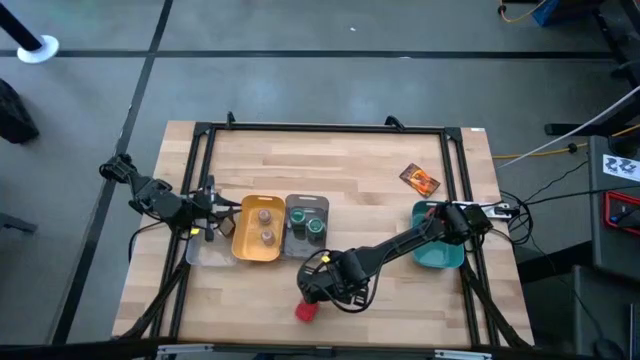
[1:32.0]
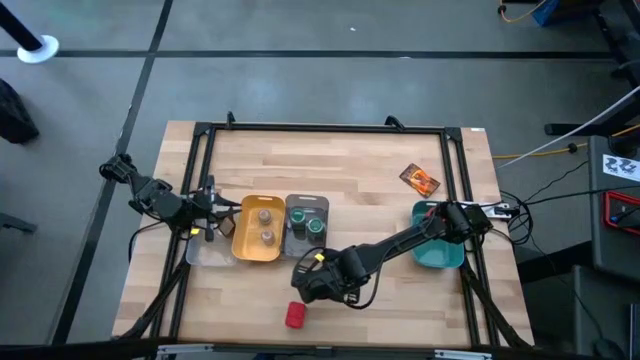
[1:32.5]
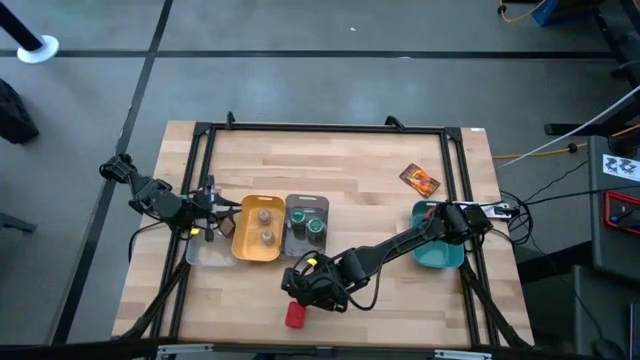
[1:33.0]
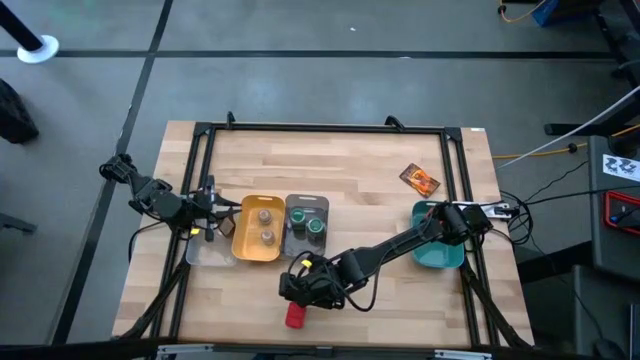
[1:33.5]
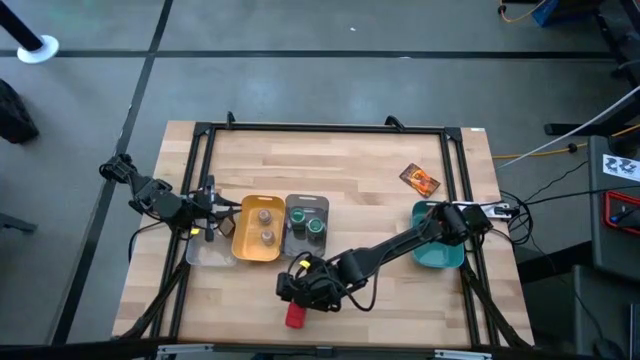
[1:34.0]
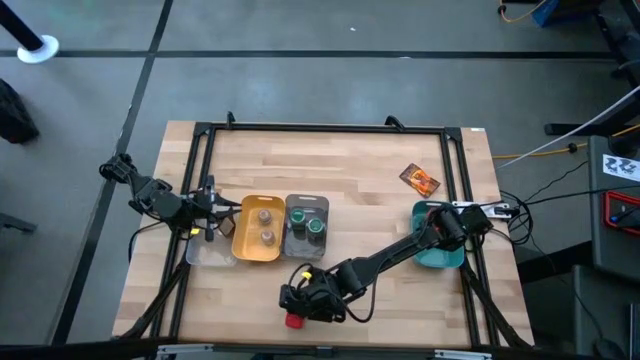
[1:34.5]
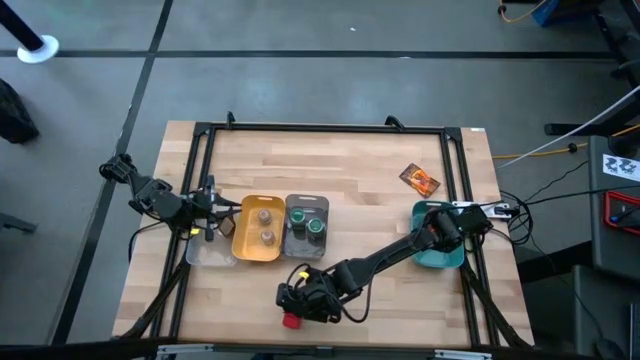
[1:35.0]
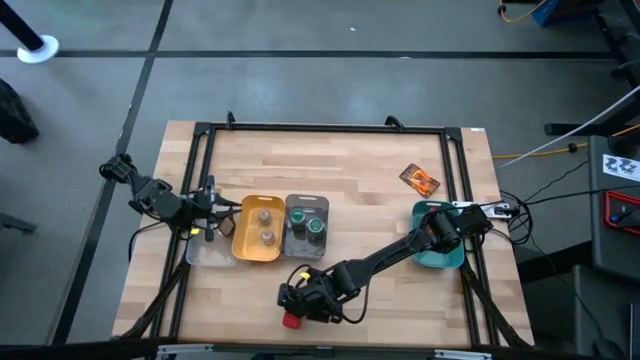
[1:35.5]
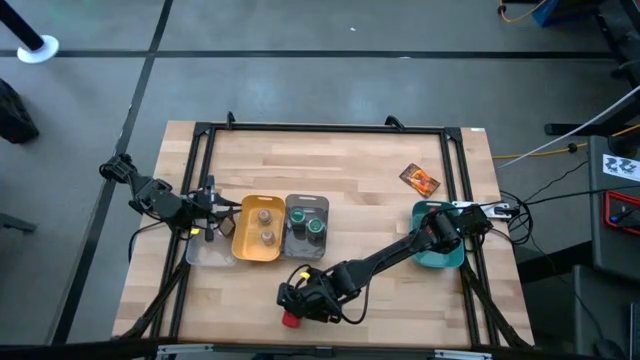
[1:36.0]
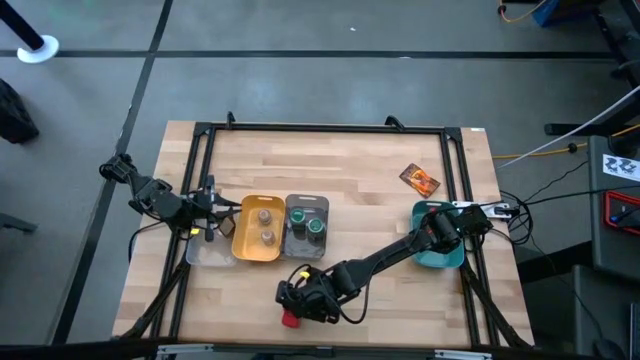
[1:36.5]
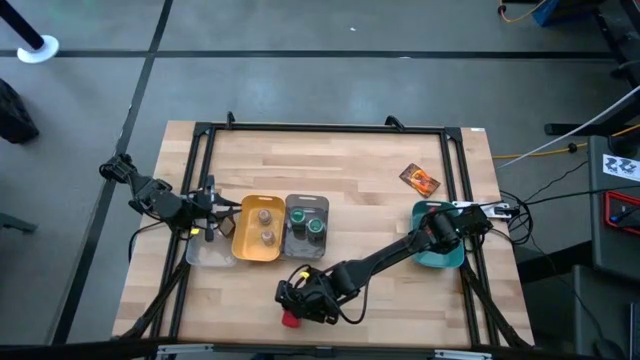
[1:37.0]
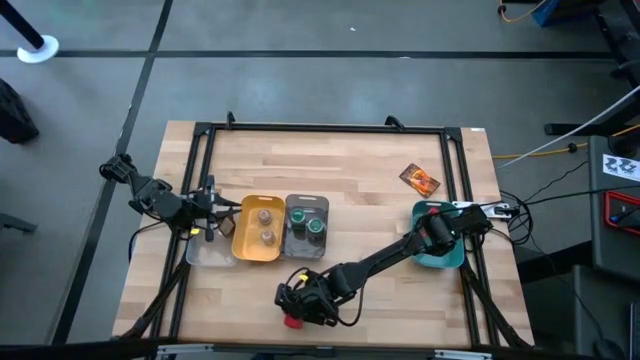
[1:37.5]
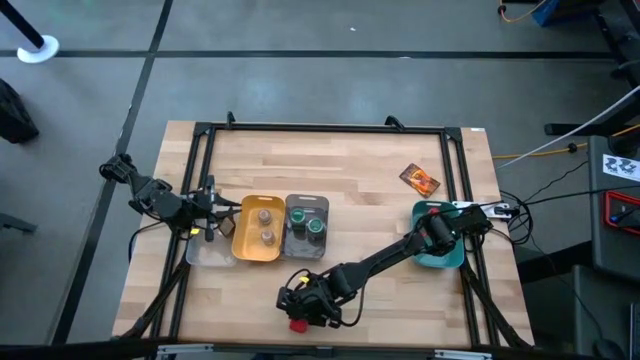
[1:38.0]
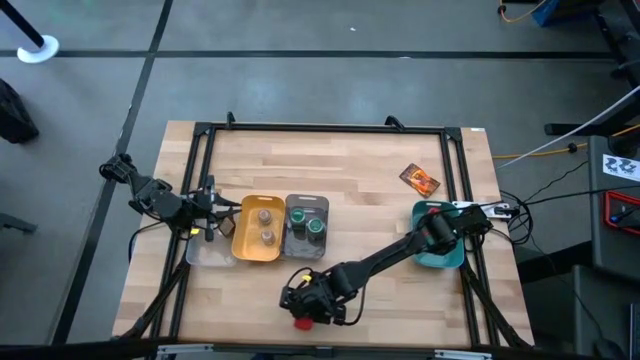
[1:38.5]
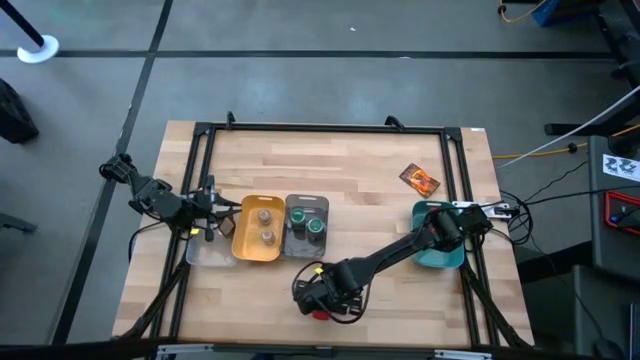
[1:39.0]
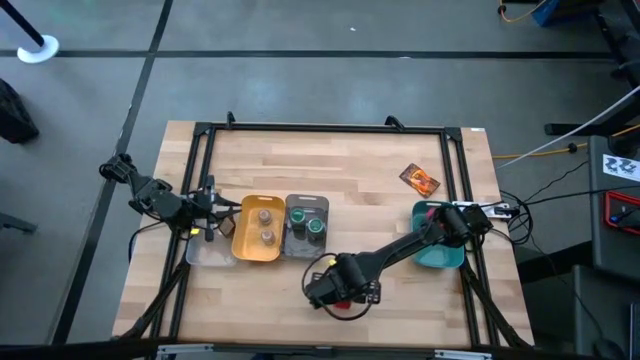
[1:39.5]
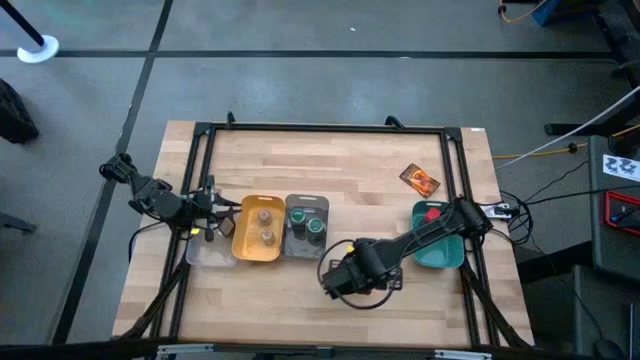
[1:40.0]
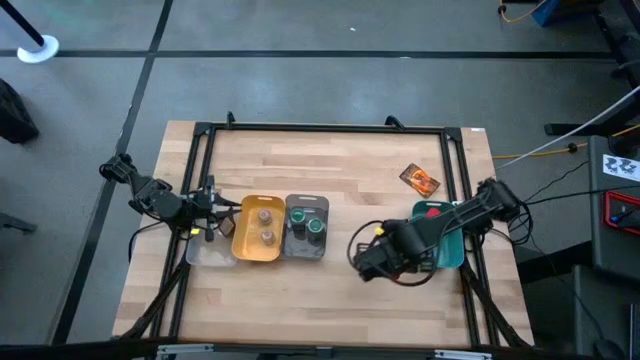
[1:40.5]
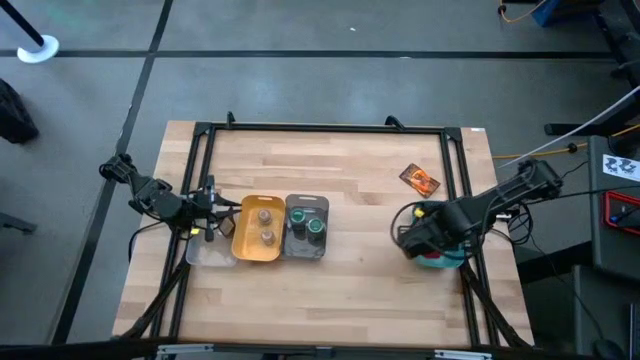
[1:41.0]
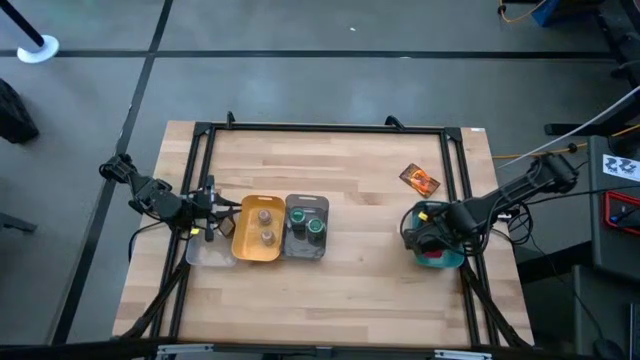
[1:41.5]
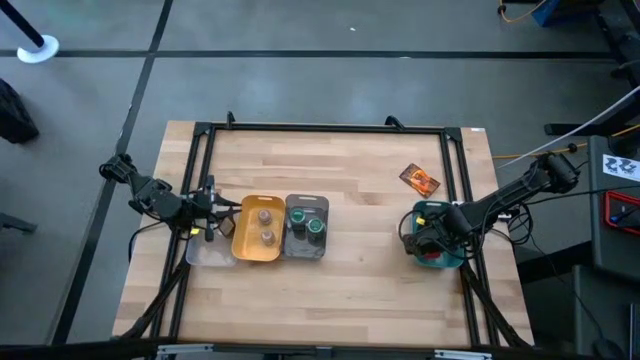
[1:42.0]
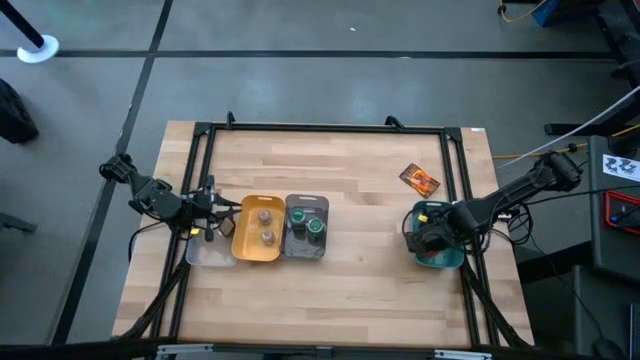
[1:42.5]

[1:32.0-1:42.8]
Task: Sort spices by type
Put the red spice can into the green bin

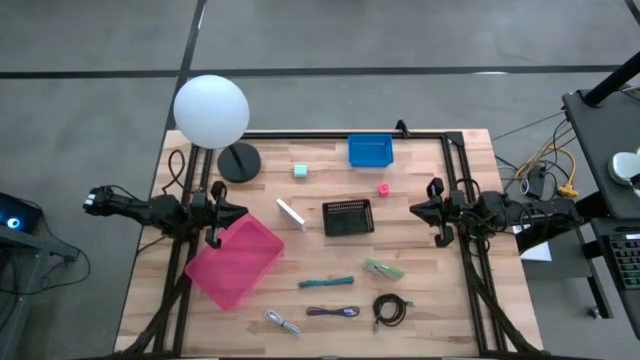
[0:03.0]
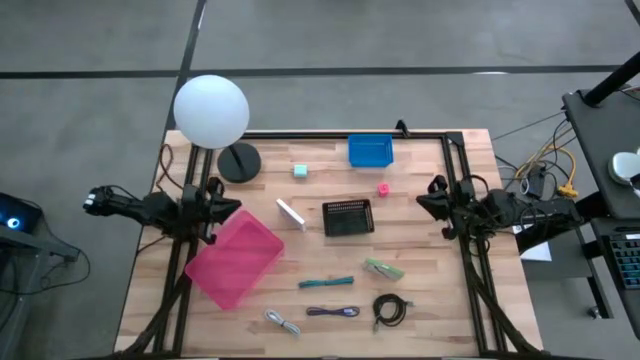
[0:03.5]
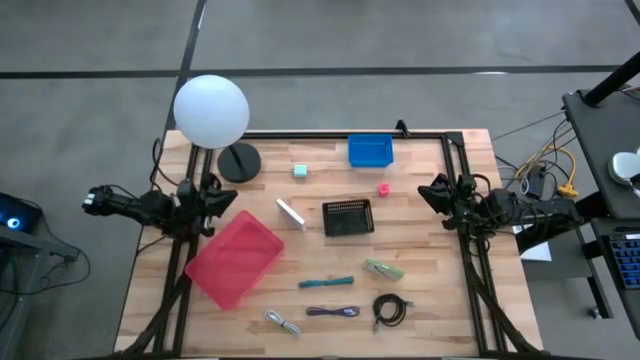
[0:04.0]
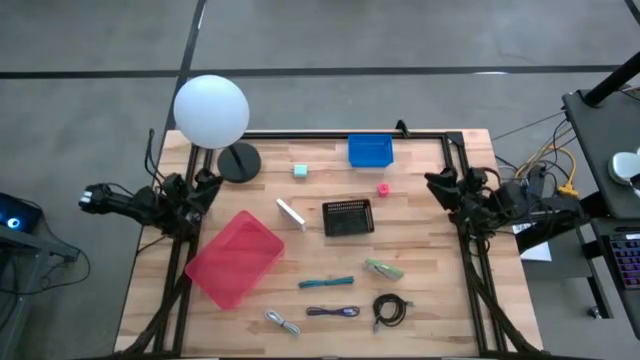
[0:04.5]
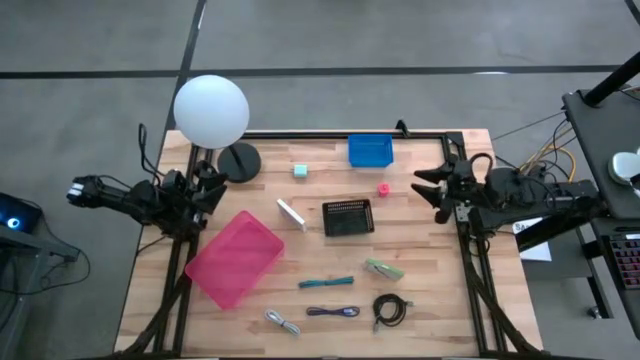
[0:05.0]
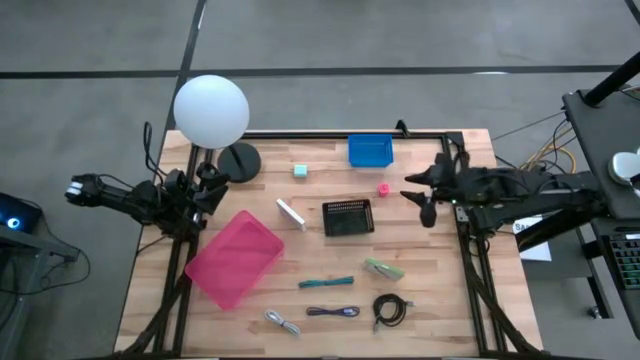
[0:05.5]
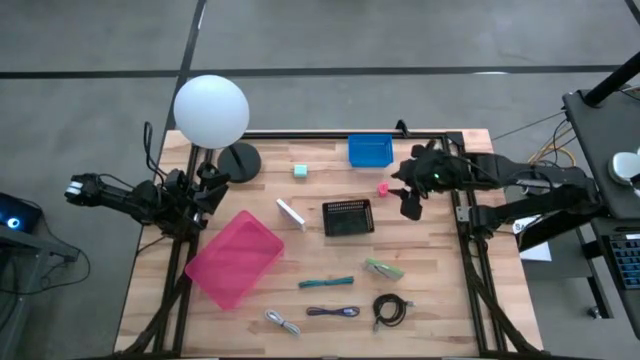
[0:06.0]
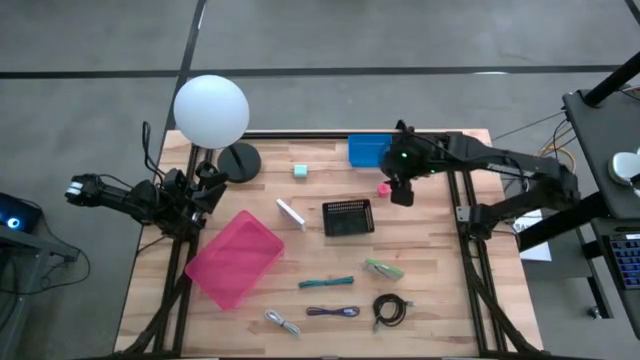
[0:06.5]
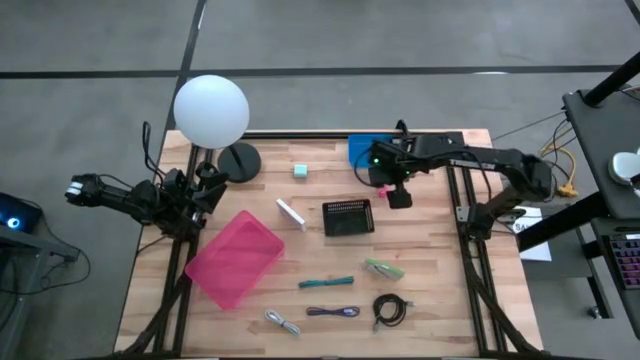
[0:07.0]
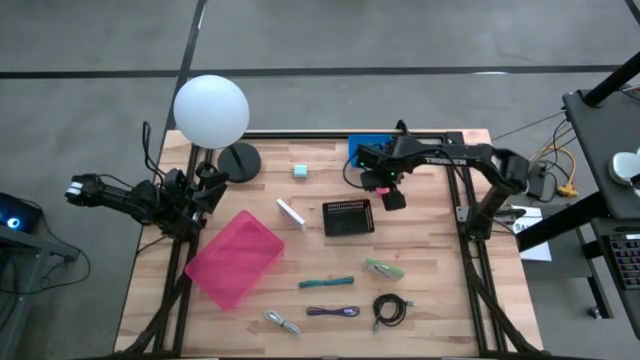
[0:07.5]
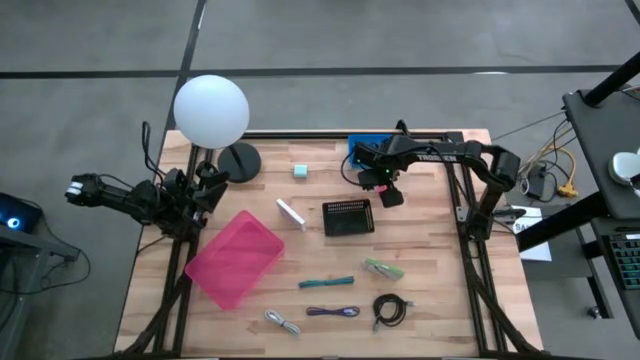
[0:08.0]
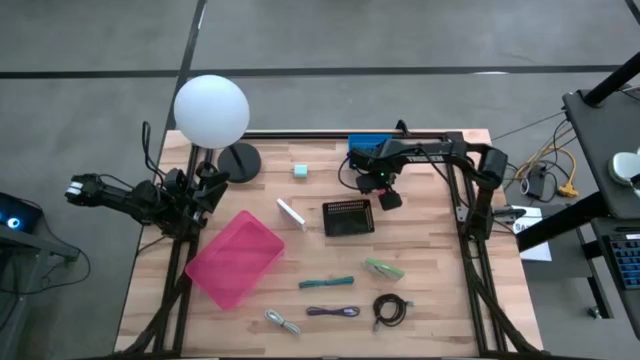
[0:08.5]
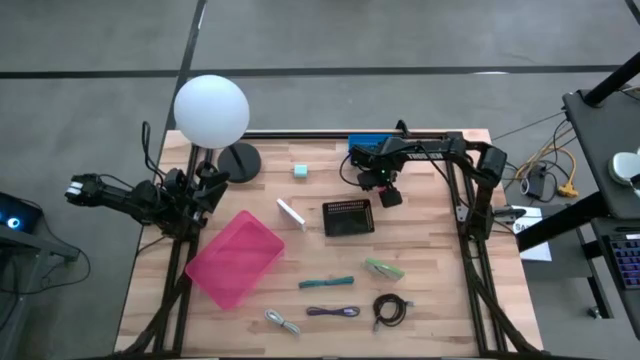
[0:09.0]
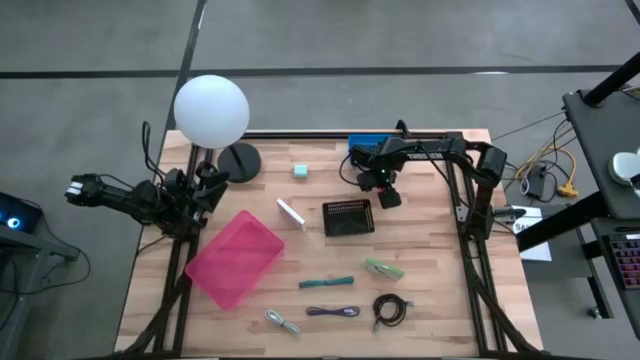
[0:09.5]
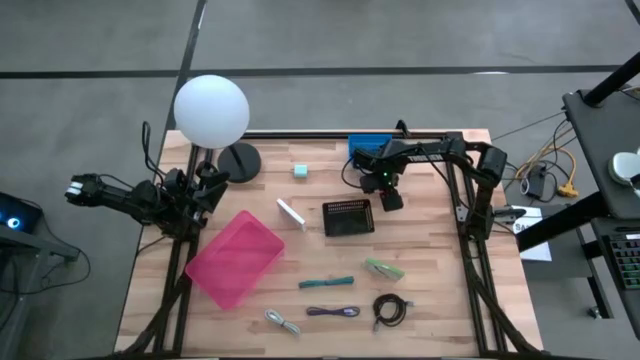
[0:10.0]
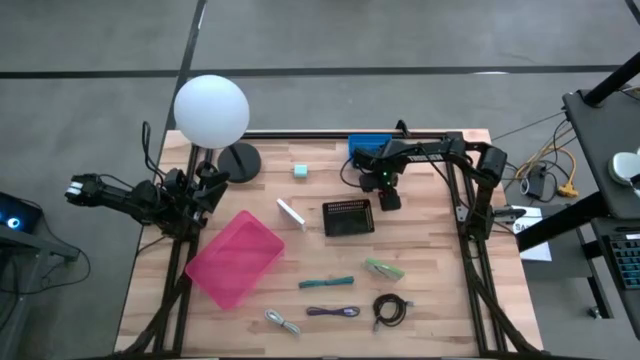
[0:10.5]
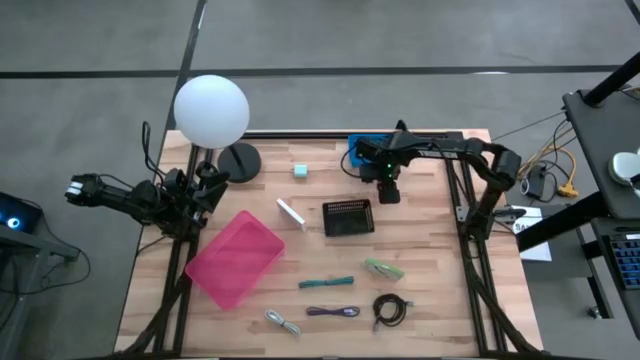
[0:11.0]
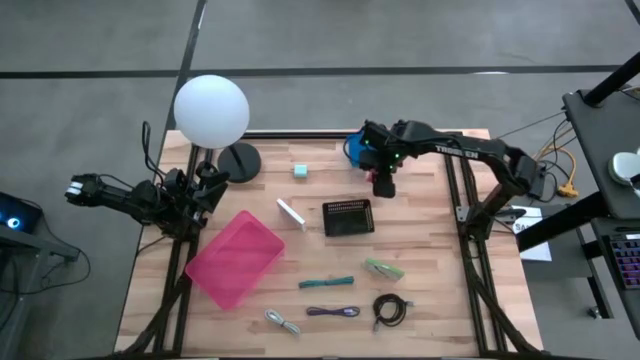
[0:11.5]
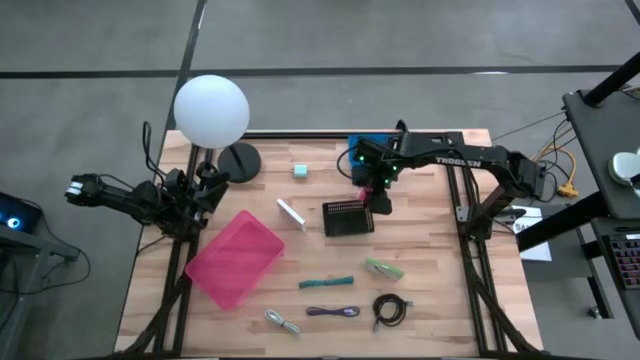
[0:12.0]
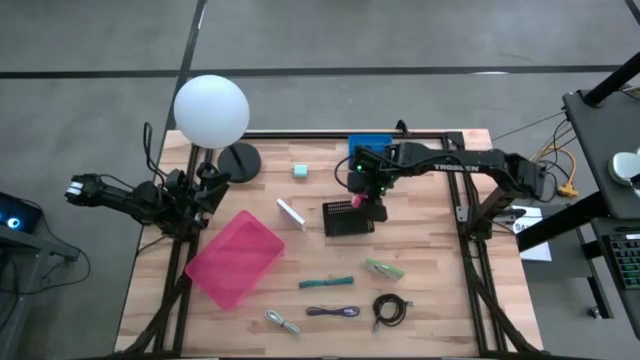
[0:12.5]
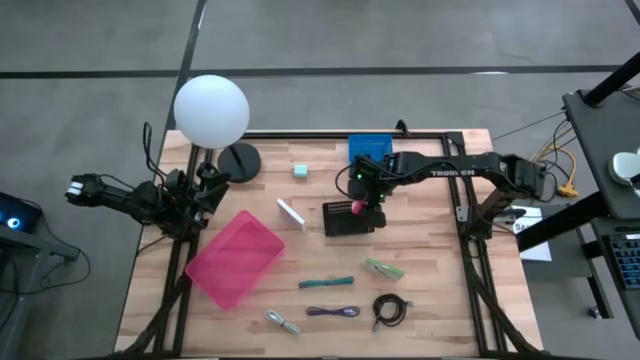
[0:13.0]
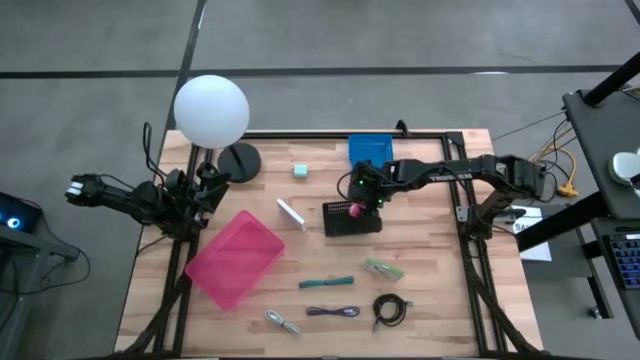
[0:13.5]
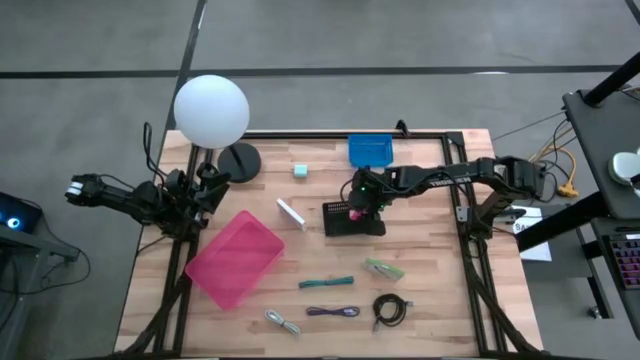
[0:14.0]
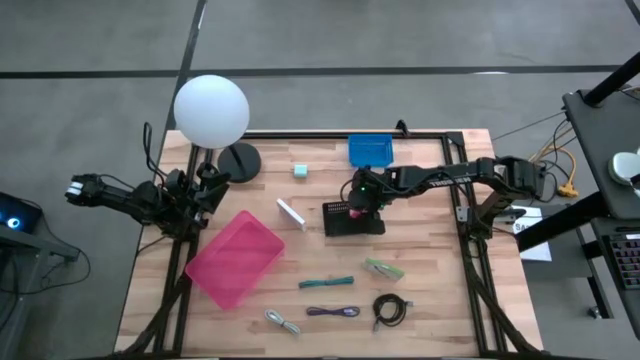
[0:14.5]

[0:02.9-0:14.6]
Task: Pick and place items into bin
Put the pink charger adapter into the black bin
